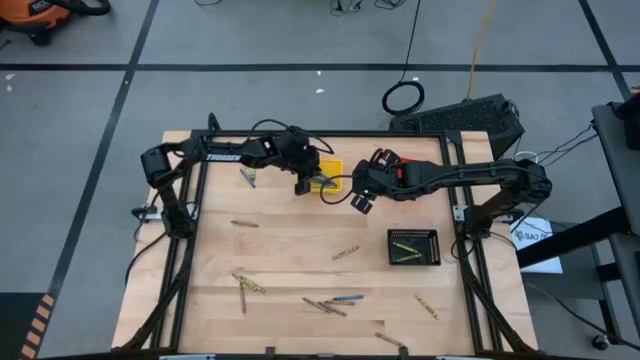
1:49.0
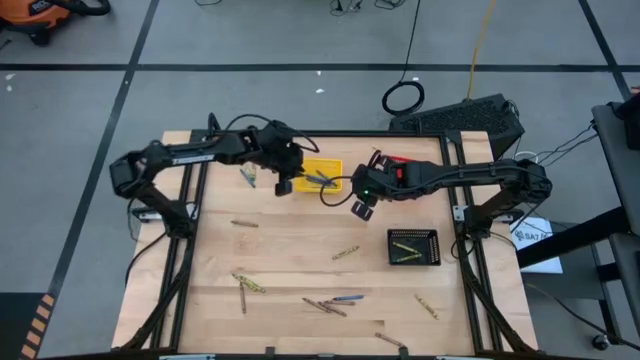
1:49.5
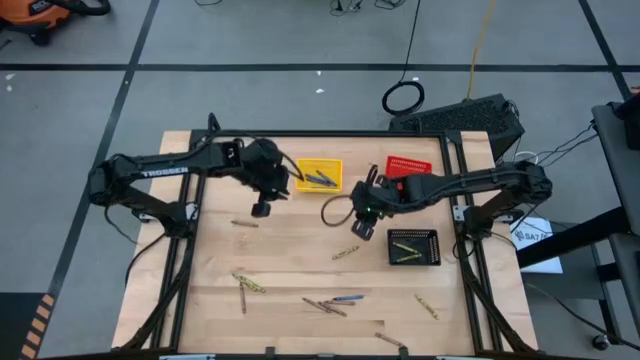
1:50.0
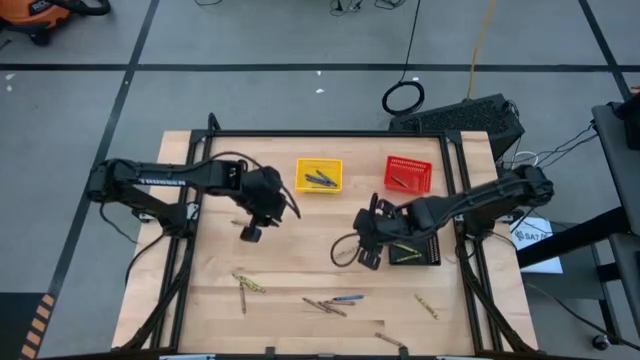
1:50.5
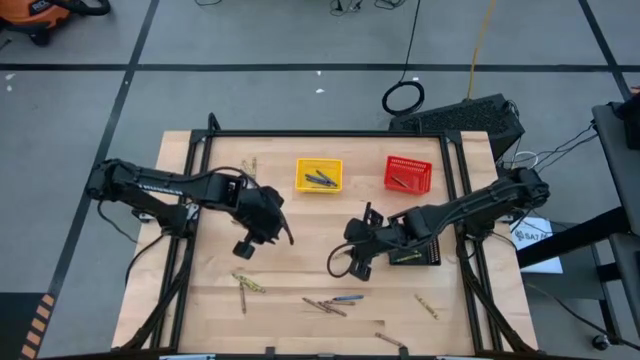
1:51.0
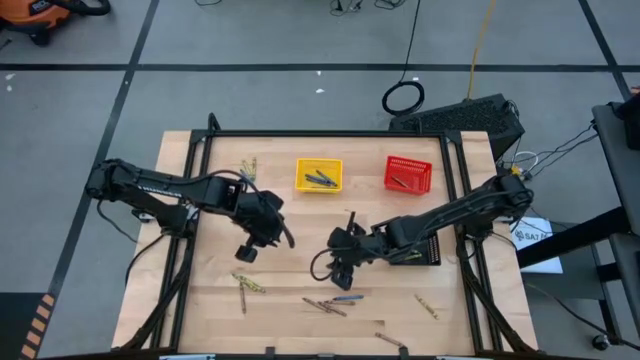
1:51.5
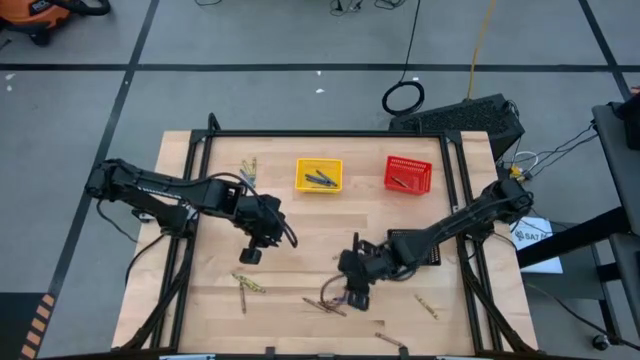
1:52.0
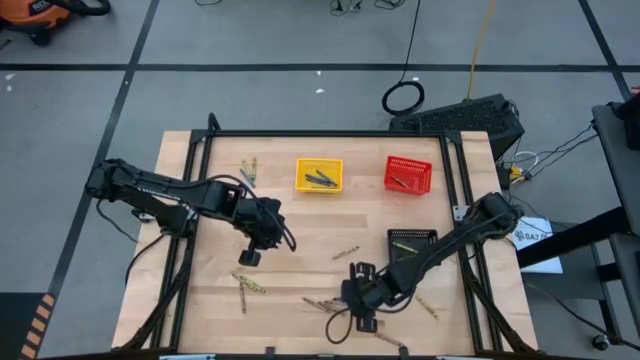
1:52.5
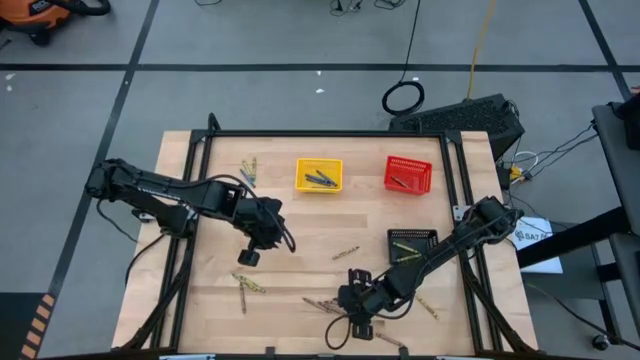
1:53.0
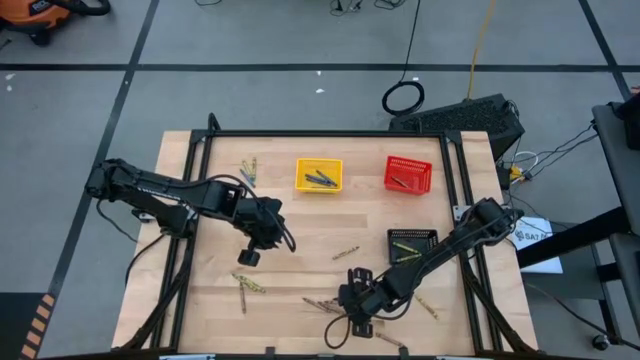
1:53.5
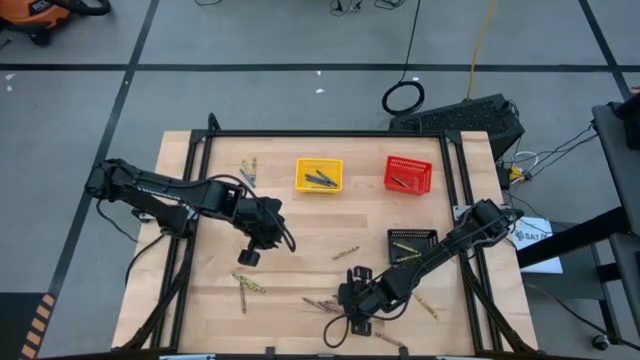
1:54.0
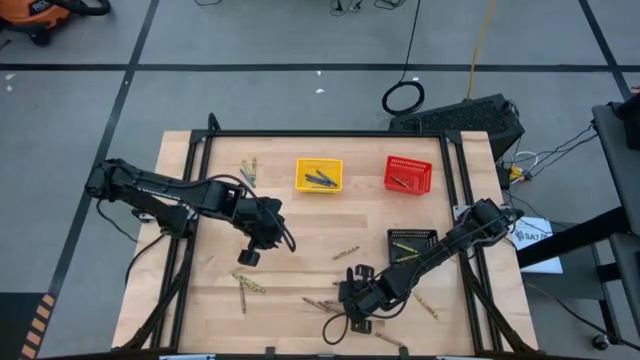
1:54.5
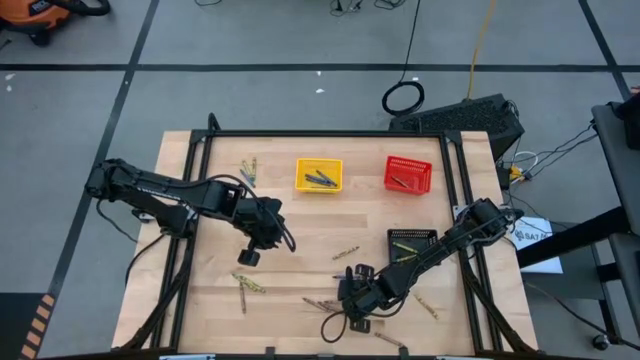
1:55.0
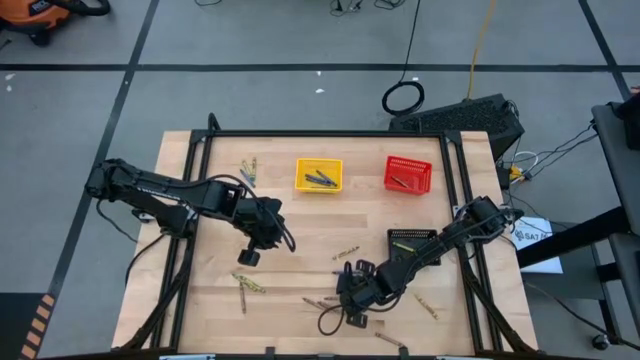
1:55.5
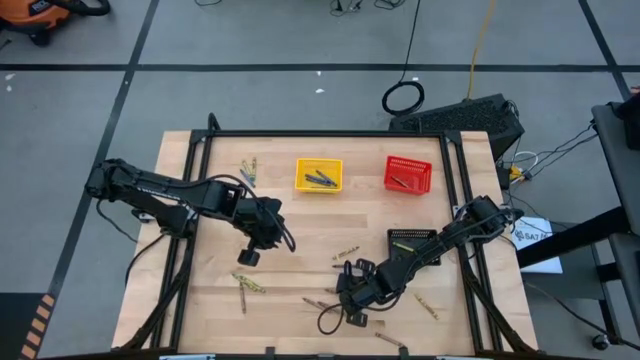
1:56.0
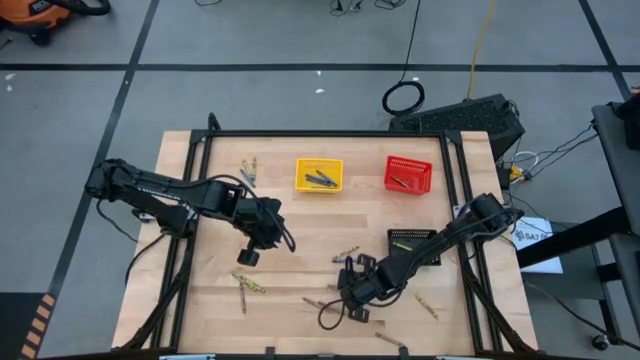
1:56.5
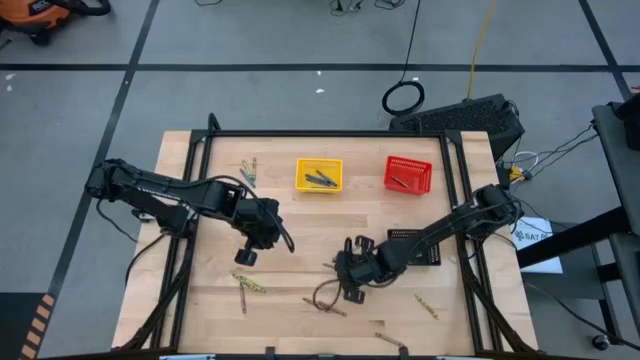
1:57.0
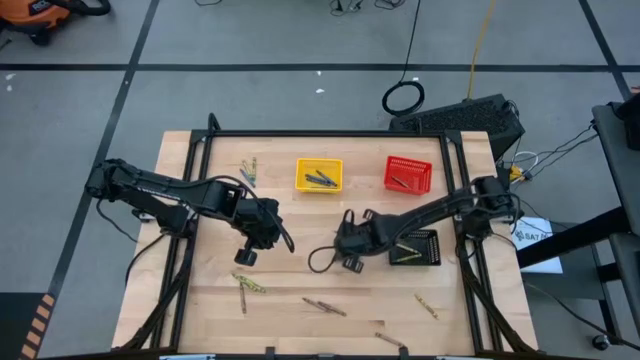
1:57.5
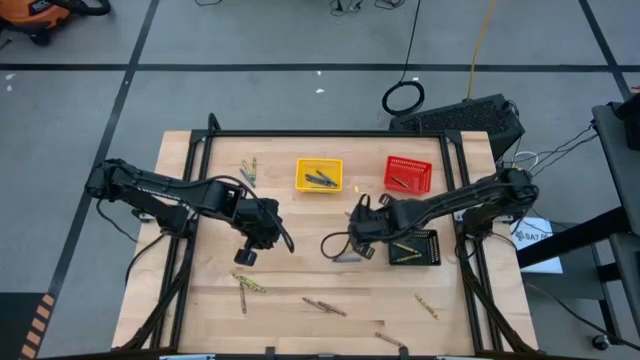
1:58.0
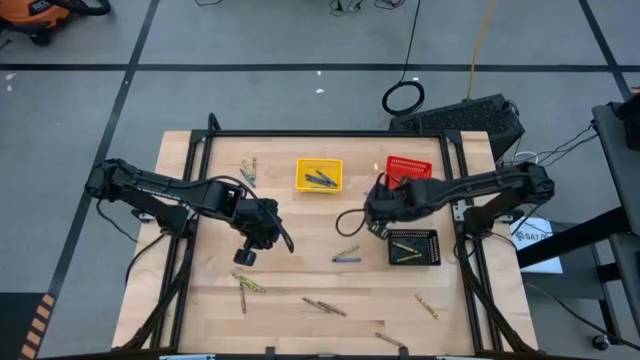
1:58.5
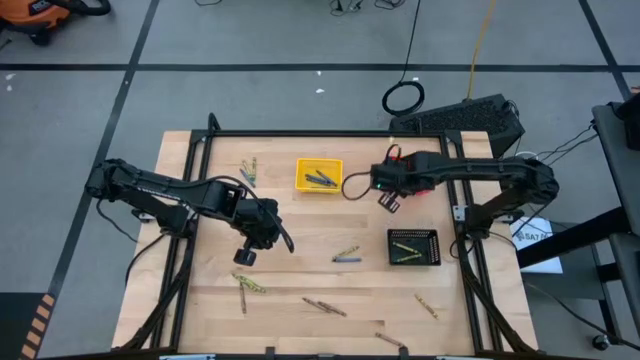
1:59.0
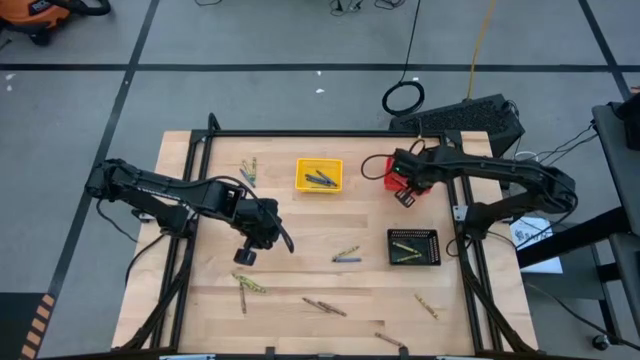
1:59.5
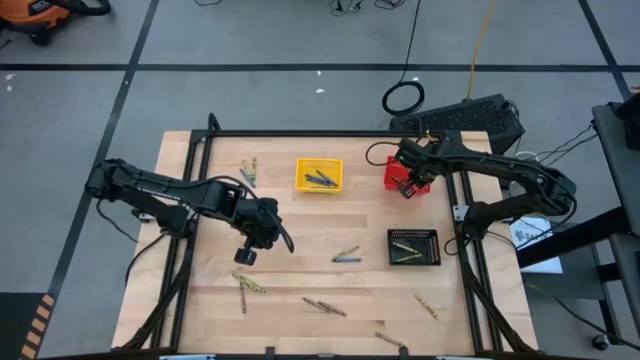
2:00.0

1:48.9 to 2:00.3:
Task: Sort crayons
Put the brown crayon into the red bin

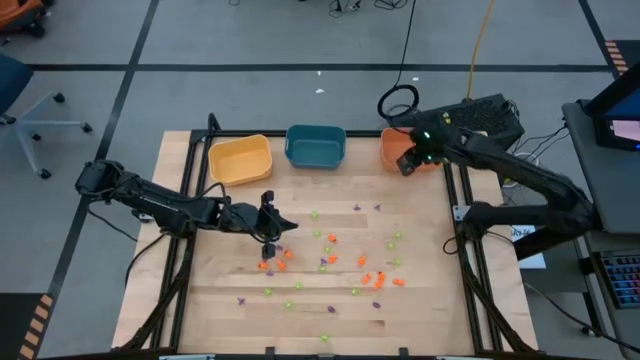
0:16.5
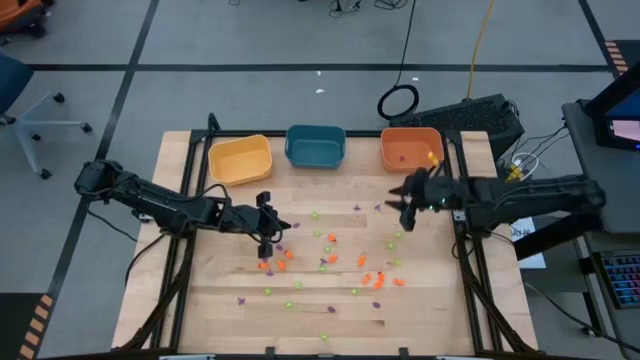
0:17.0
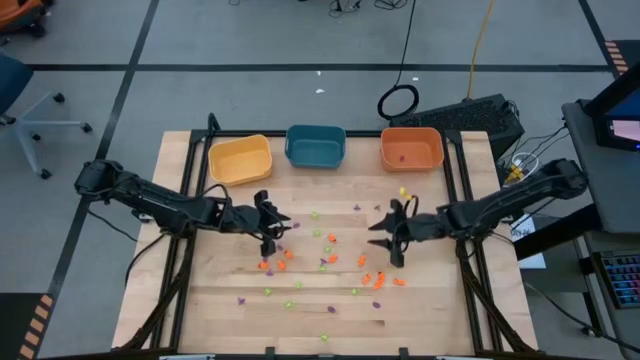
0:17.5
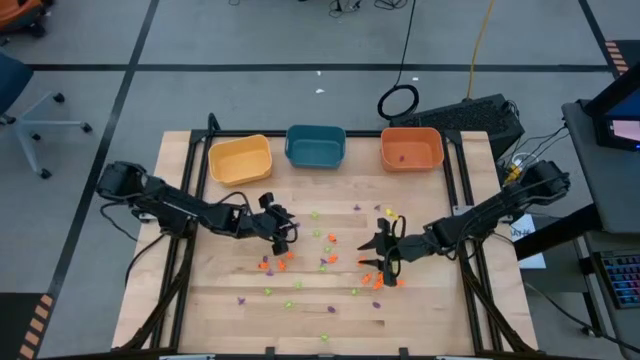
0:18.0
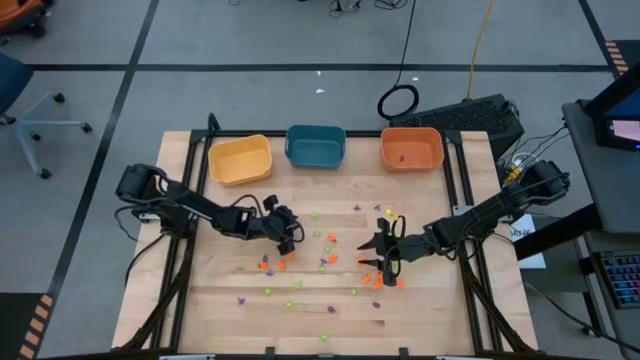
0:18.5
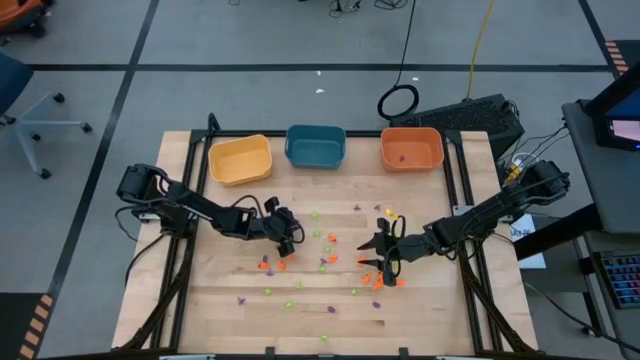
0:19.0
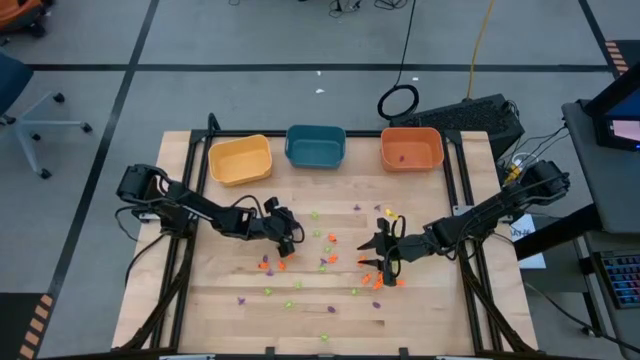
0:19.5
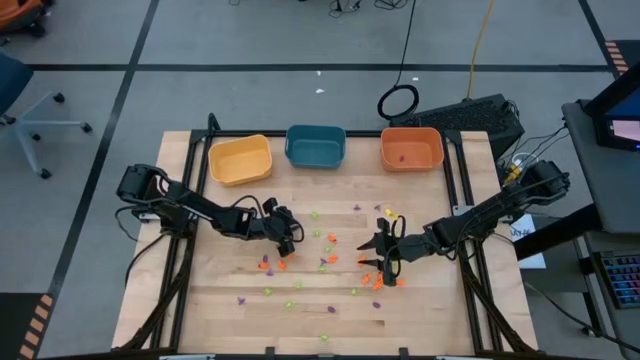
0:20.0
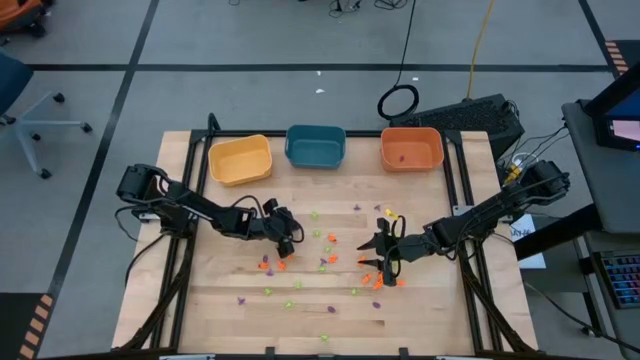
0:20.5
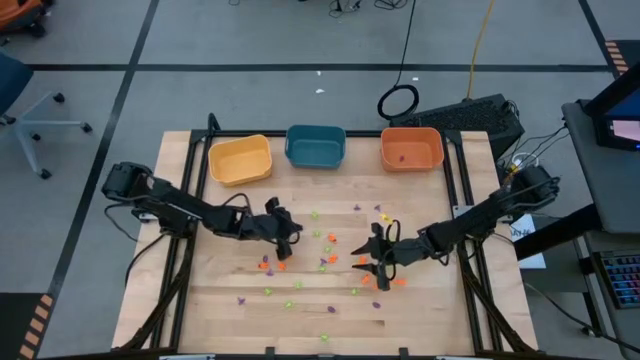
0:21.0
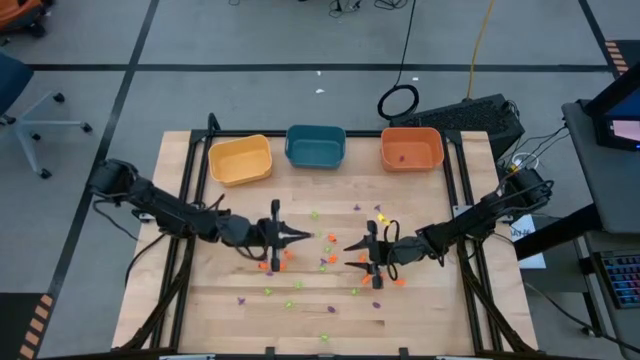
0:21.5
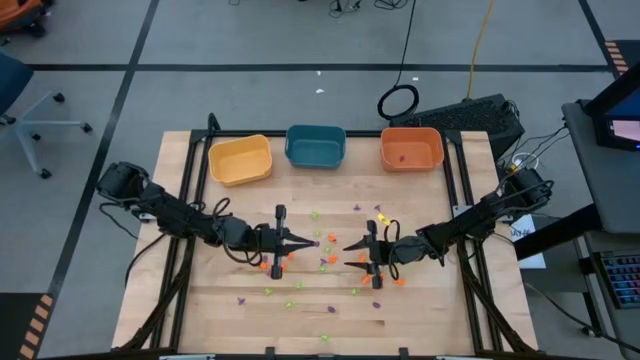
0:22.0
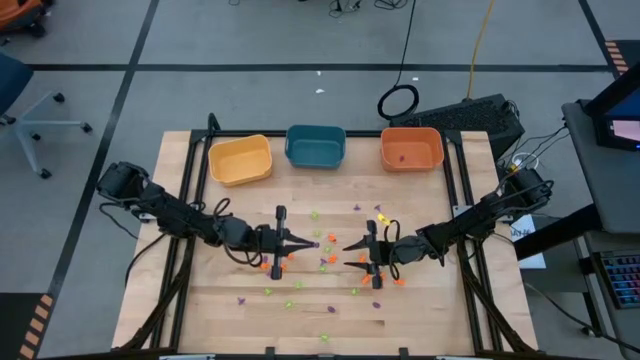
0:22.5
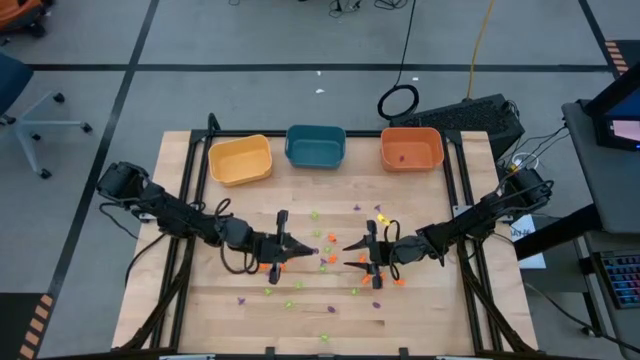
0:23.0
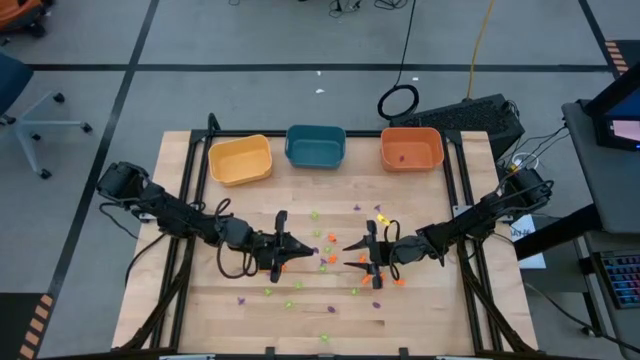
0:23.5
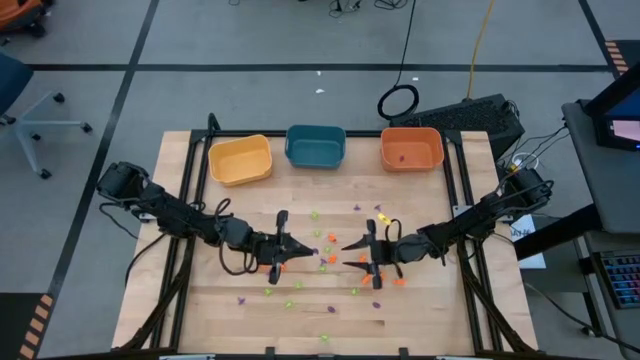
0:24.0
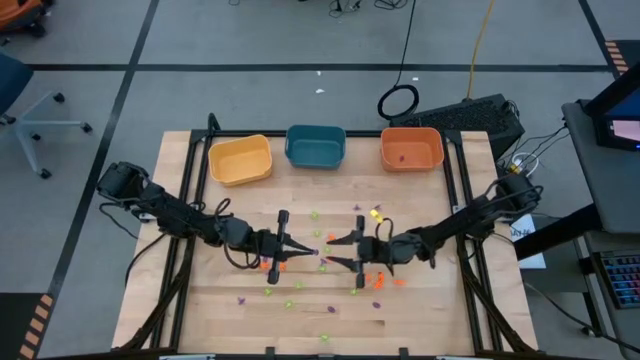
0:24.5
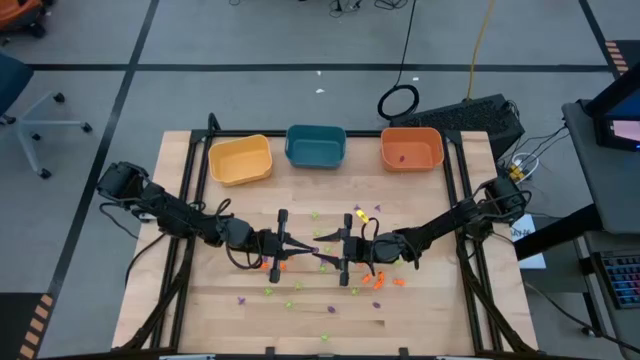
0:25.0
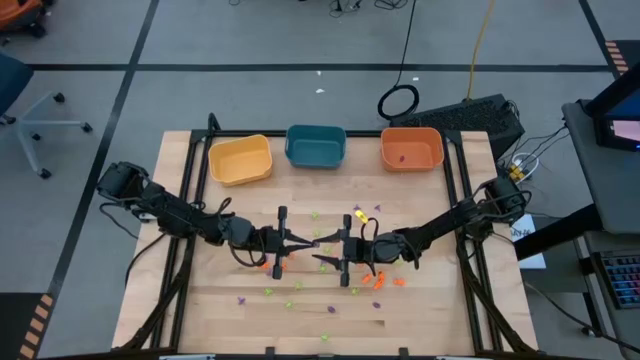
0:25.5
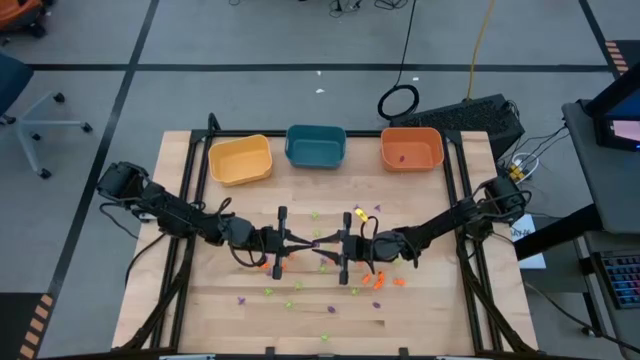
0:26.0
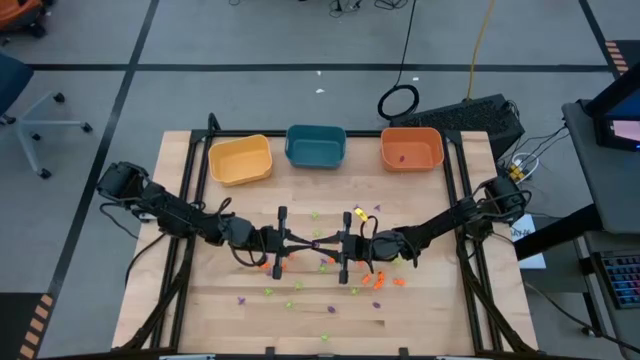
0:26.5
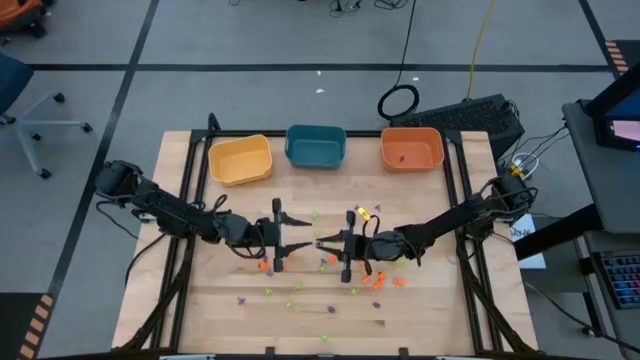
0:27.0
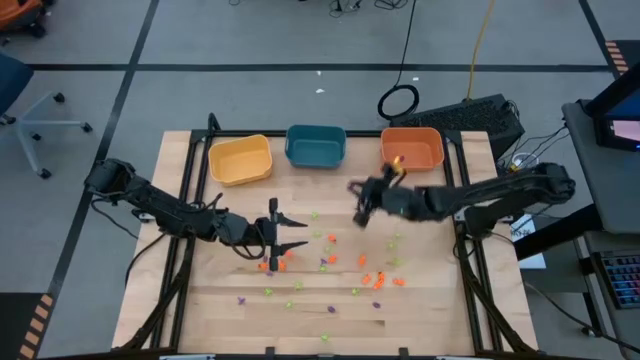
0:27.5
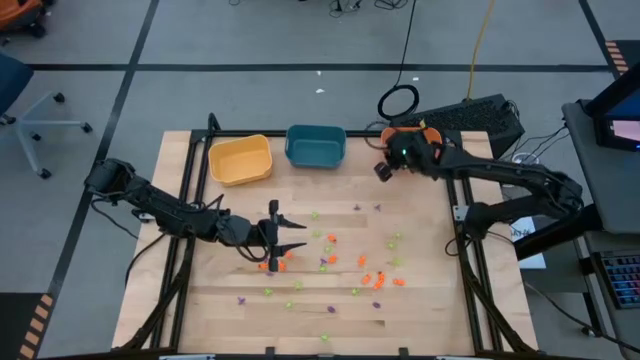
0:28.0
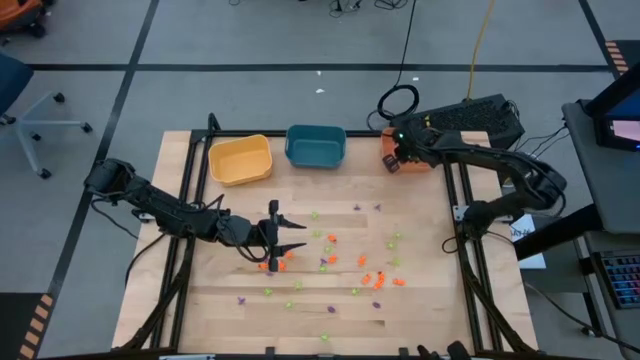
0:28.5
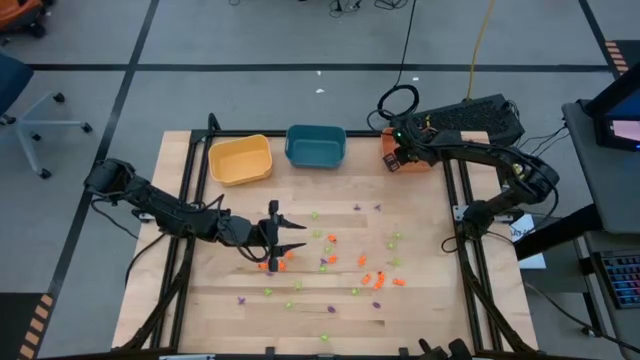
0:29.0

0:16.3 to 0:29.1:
Task: Sort Halloween decoration
Put the violet witch hat toy into the orange bin
